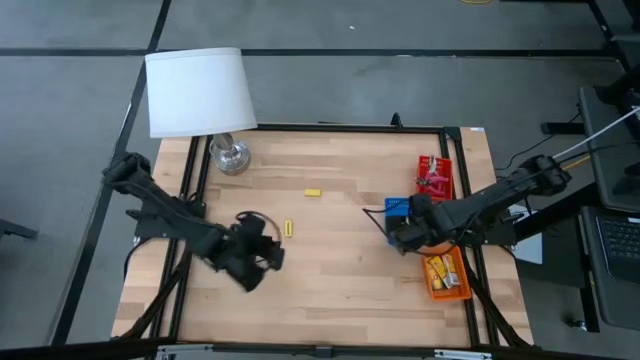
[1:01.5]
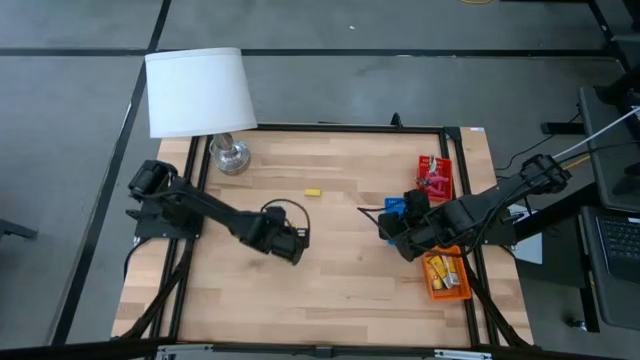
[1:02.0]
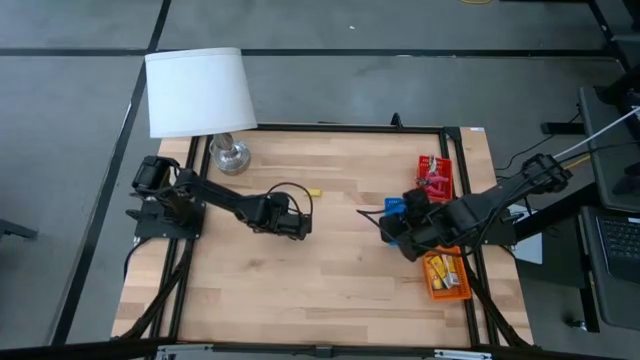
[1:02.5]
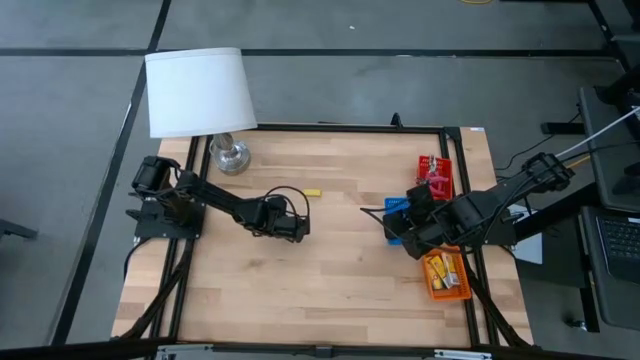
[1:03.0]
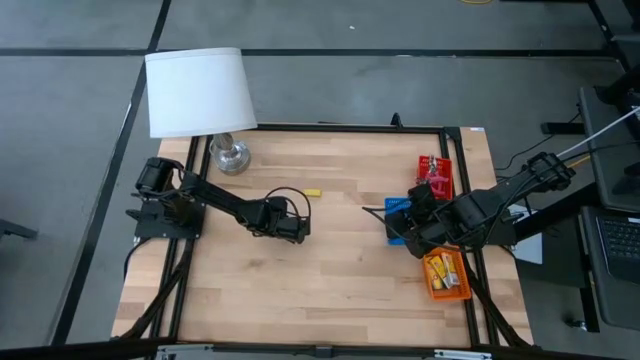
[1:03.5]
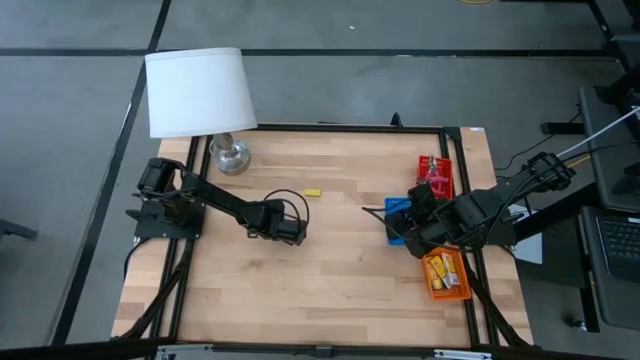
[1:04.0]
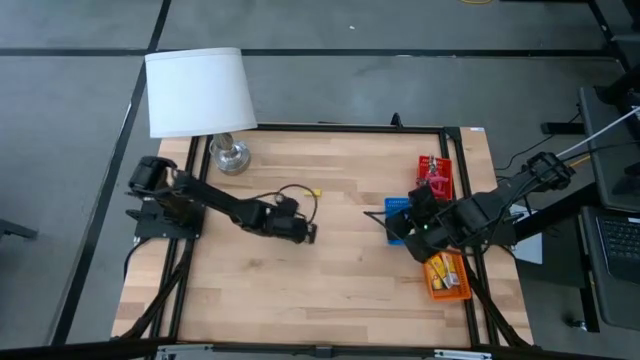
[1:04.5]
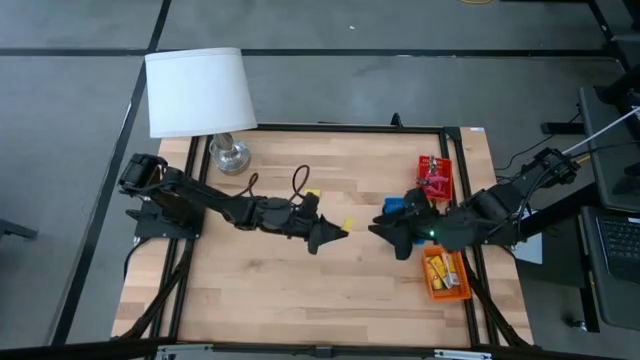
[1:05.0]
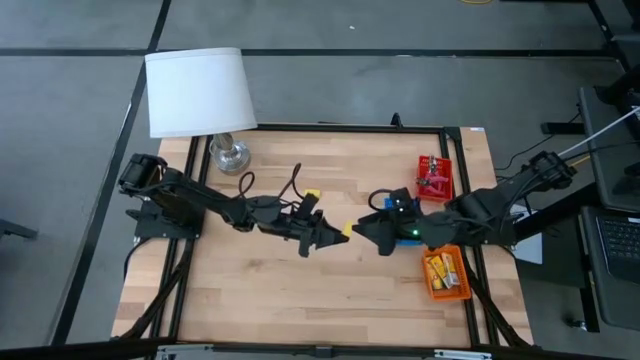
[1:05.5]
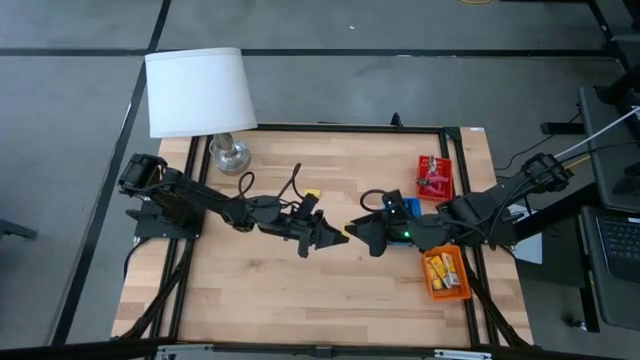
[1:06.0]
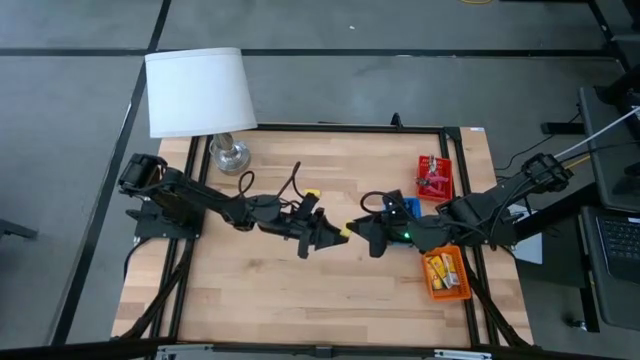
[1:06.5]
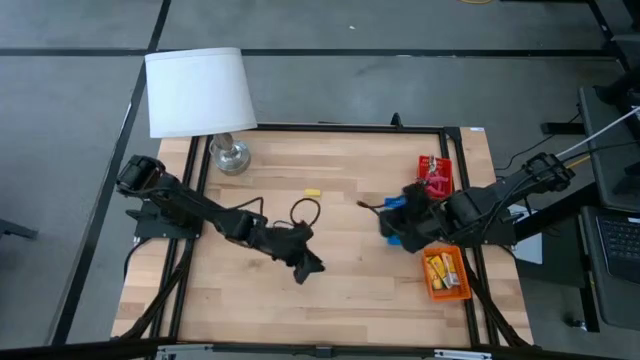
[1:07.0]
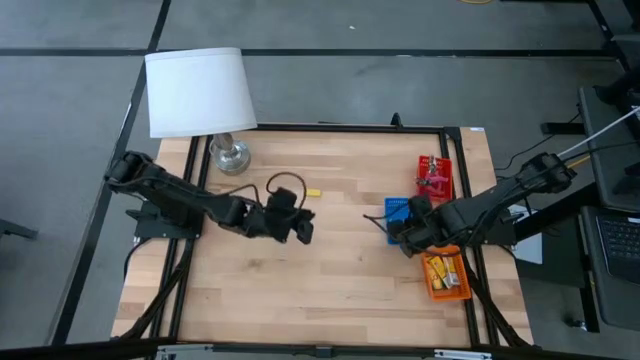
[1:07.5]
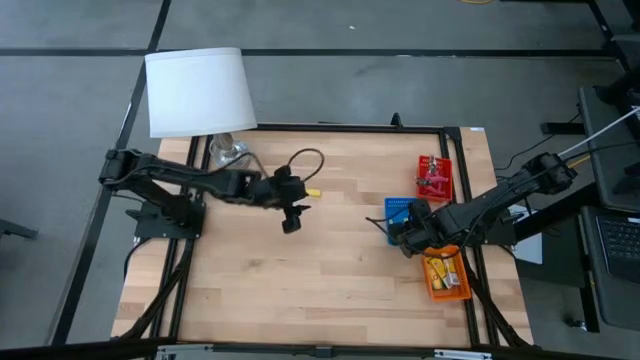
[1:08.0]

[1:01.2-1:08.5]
Task: Pick & Place School Supplies
Put the bottom yellow eraser into the blue bin

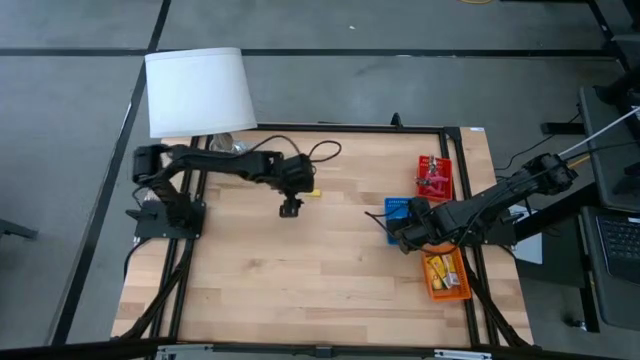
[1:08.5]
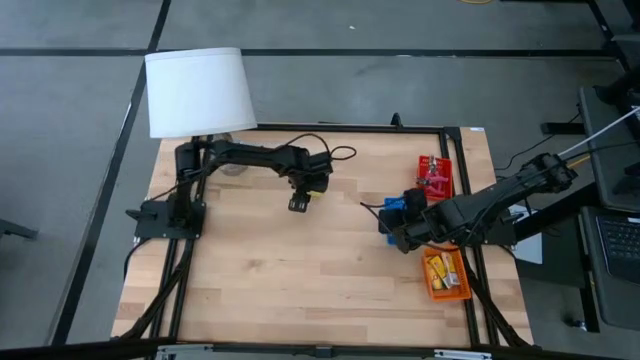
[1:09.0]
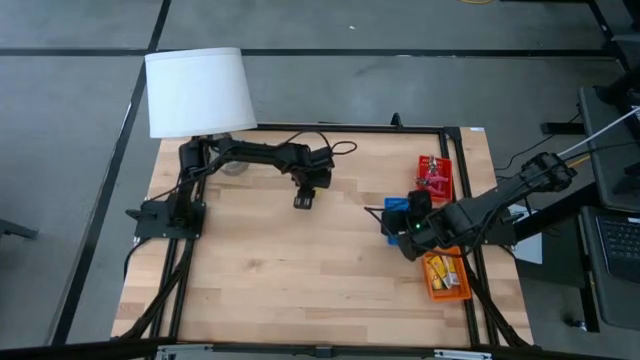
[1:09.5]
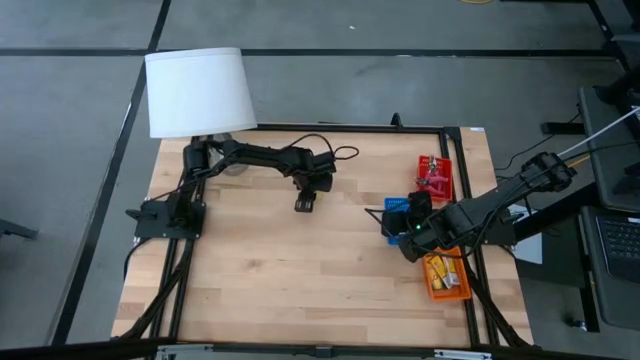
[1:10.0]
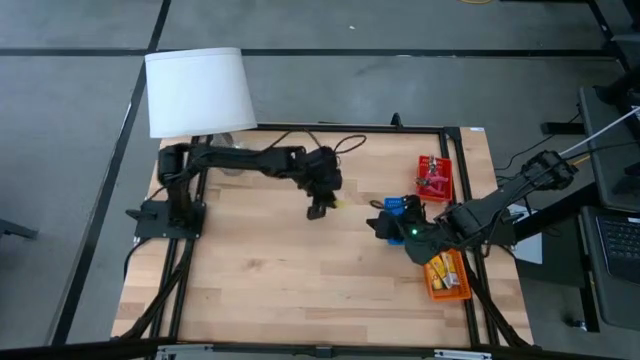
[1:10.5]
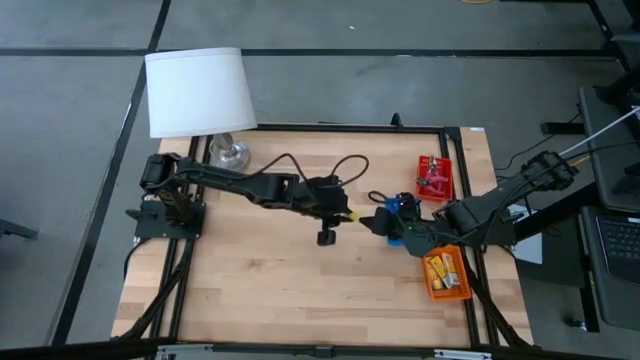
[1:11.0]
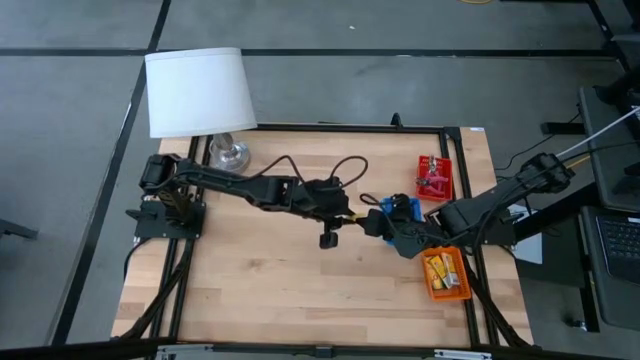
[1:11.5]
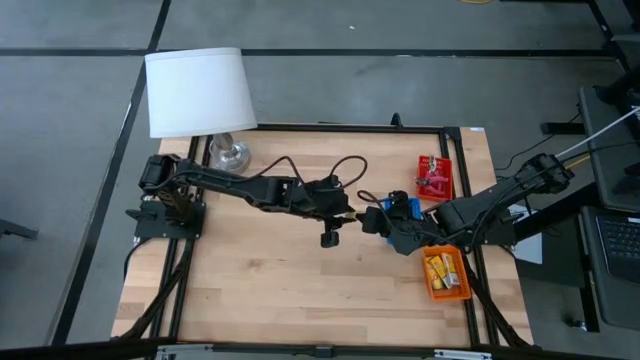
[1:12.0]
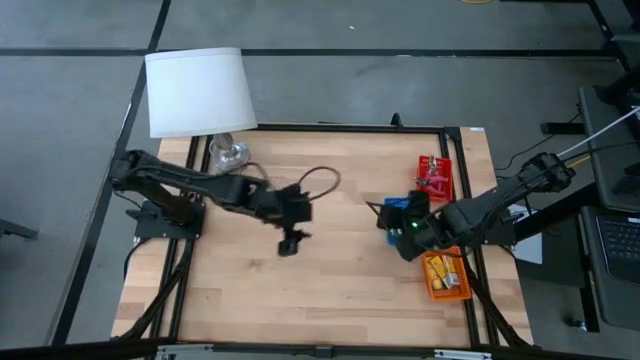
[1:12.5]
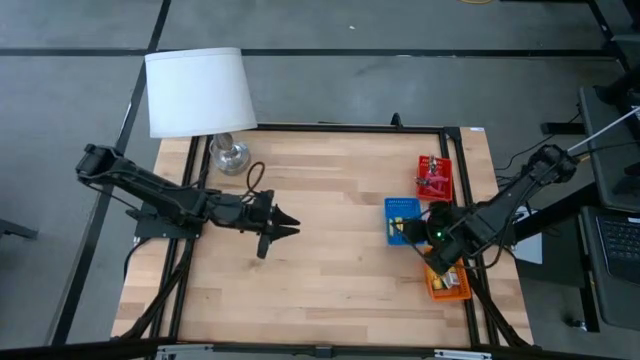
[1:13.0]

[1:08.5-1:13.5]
Put the yellow eraser into the blue bin

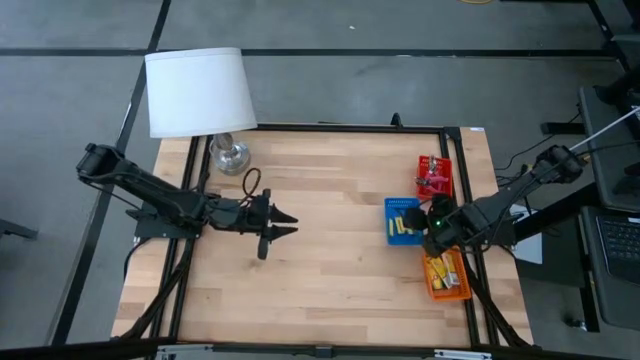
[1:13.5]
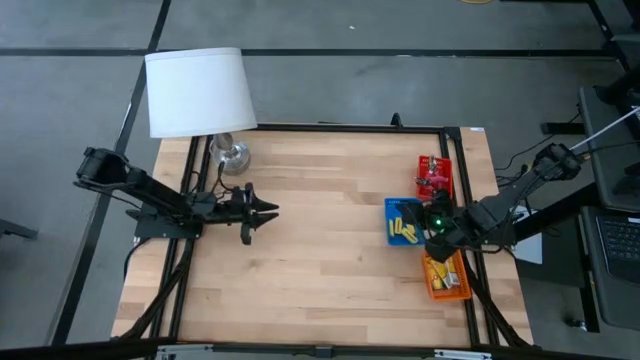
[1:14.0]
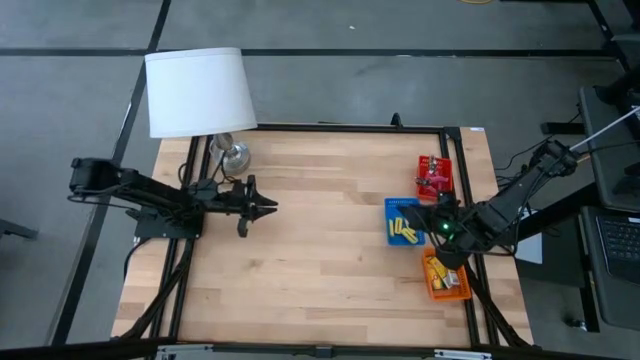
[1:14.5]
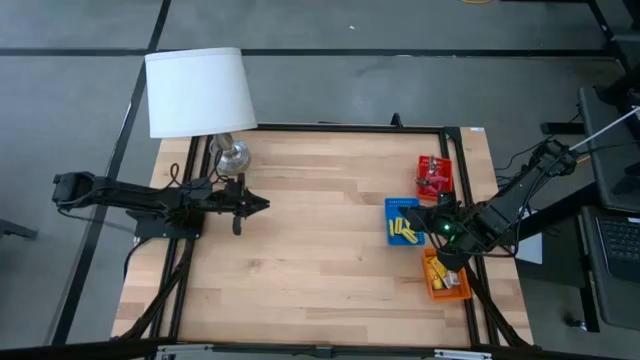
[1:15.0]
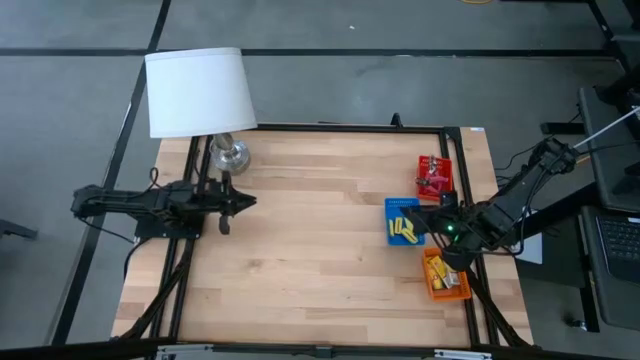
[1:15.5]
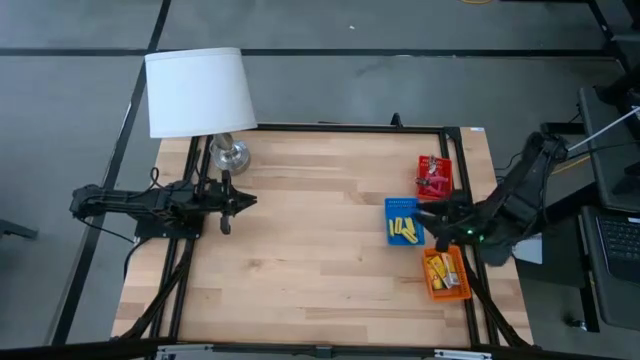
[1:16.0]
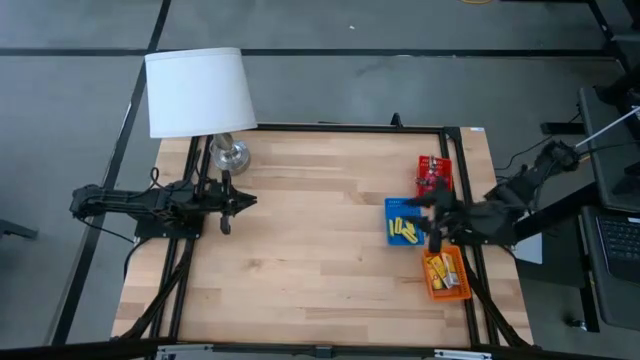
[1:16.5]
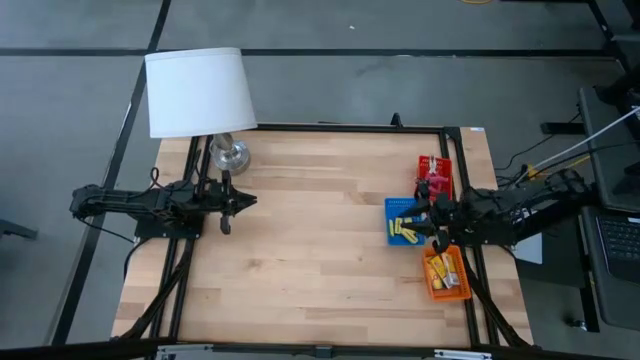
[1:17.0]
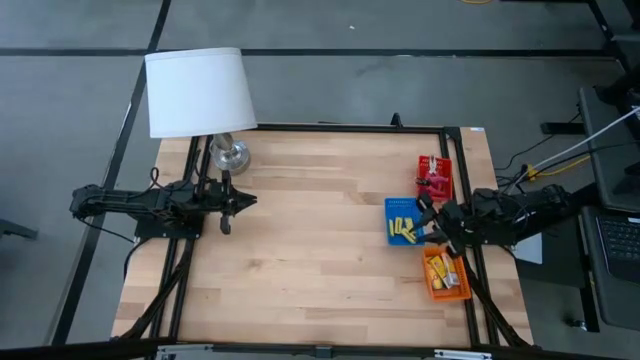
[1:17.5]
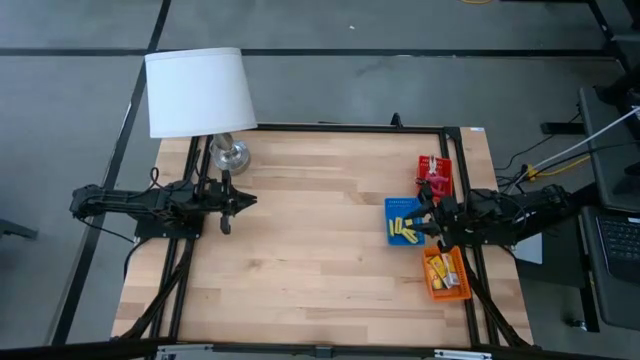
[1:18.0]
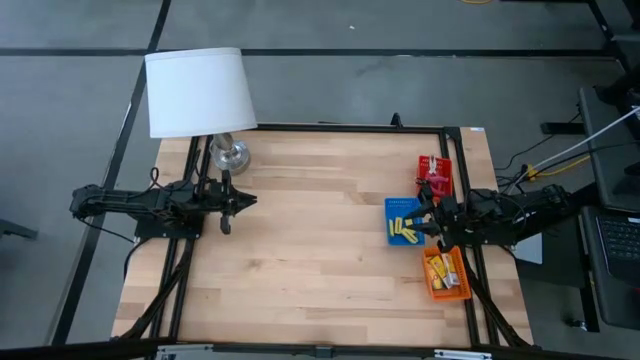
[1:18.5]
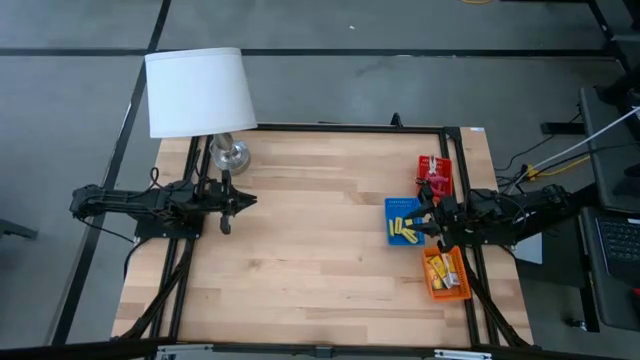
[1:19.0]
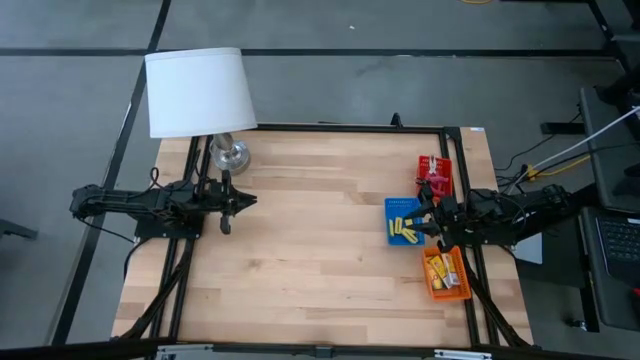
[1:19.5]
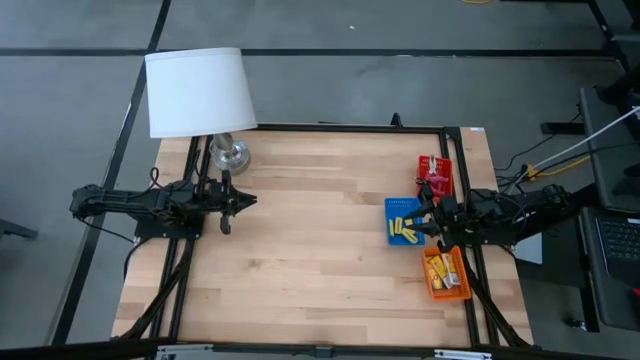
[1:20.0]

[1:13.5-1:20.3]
Return to Home Position

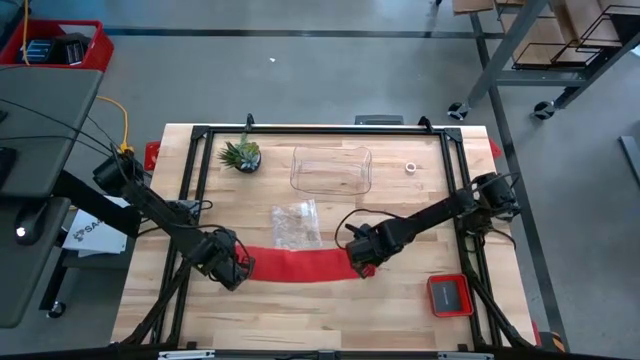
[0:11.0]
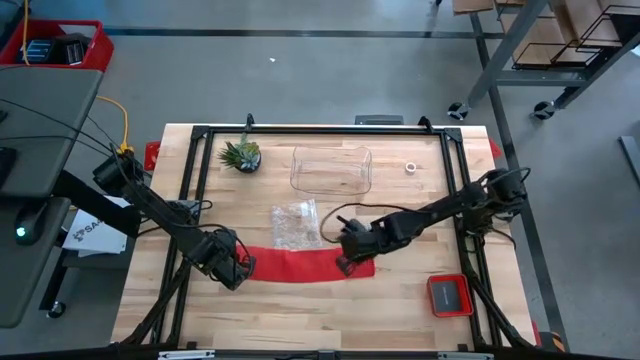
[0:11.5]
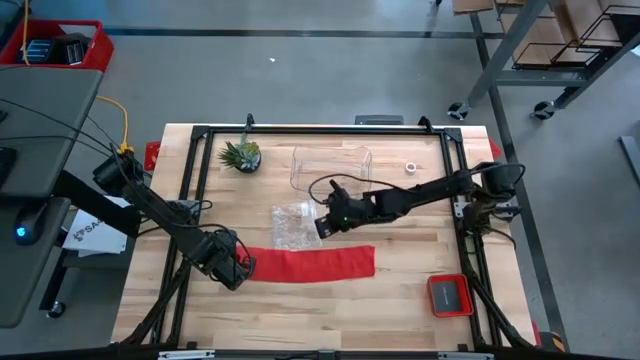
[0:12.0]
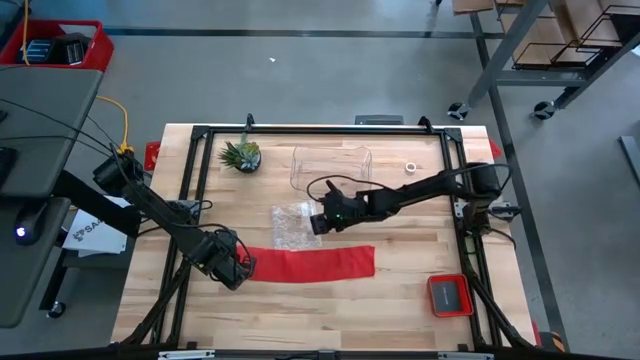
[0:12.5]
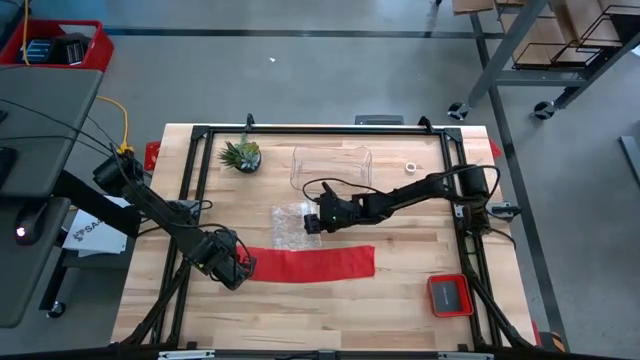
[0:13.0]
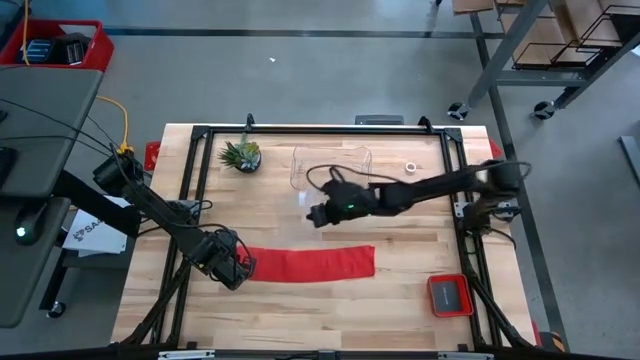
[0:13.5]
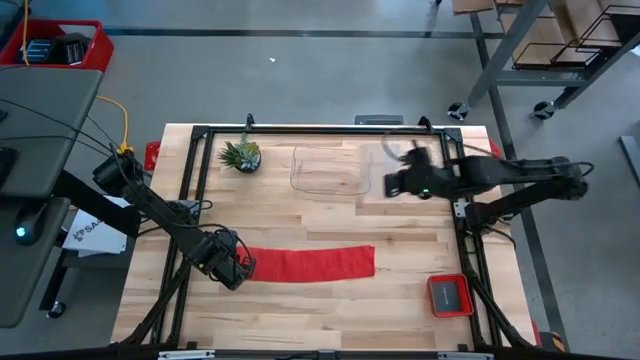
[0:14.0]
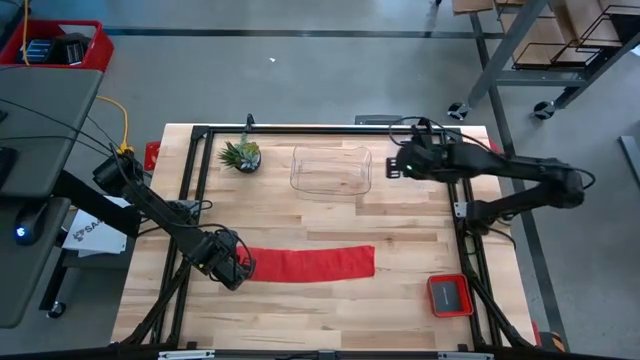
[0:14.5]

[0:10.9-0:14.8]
Task: Roll bandage
Move the transparent zip bag to the top right of the table
